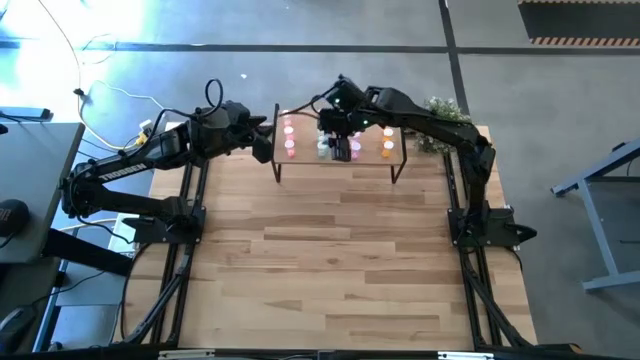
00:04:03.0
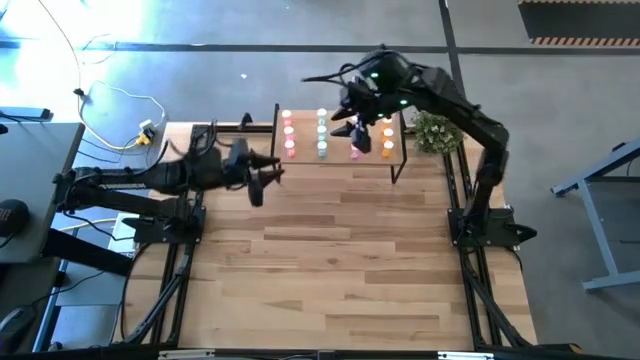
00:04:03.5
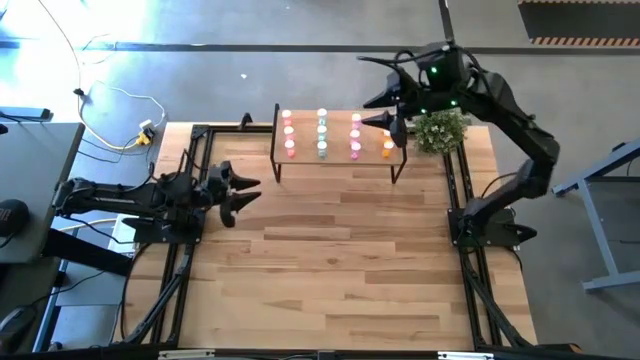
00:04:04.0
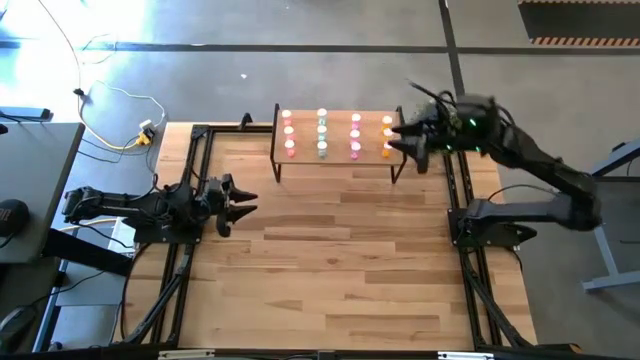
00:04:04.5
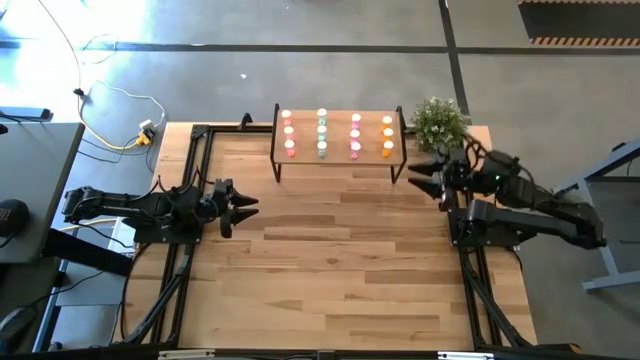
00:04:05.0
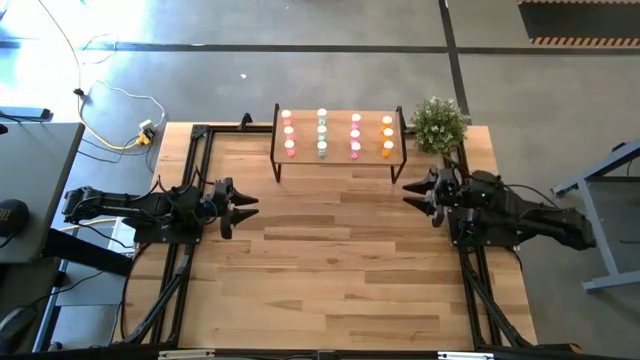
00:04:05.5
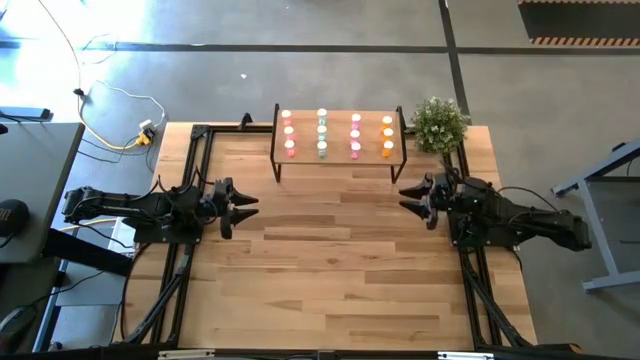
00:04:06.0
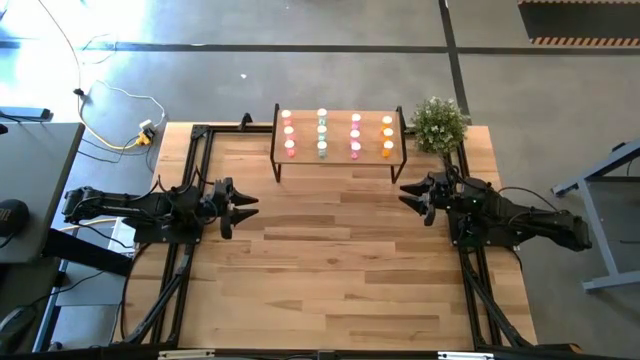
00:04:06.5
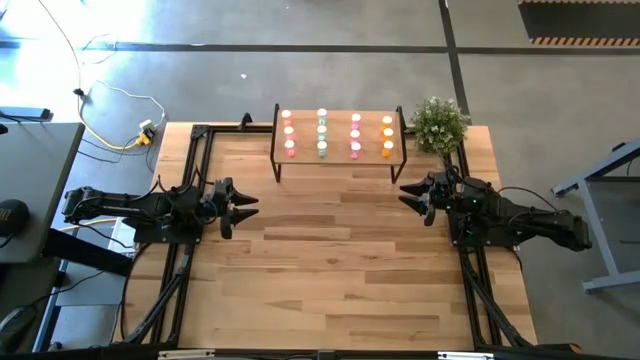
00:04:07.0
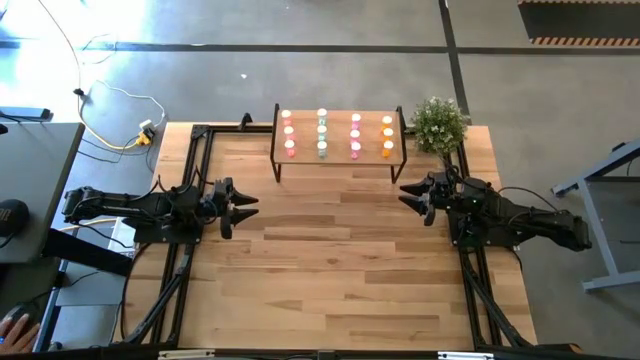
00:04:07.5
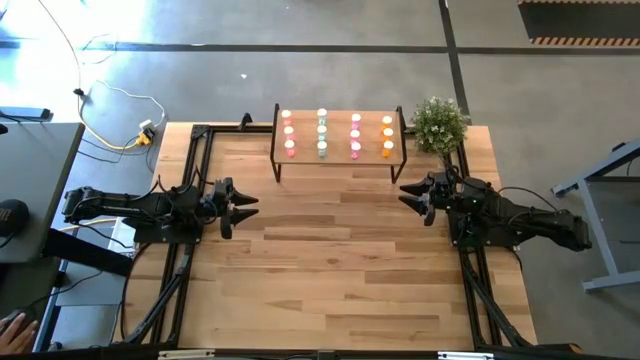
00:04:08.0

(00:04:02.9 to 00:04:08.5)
Task: Pick and place medicine bottles onto shelf by color
Return to Home Position

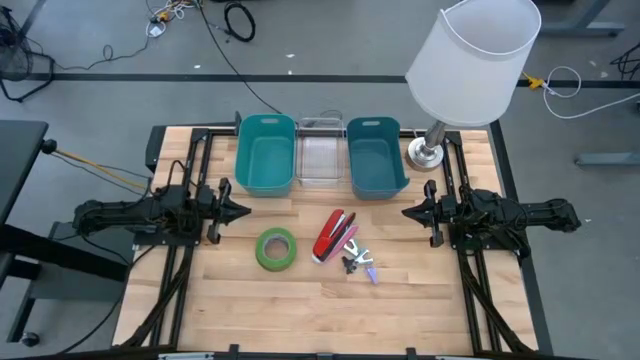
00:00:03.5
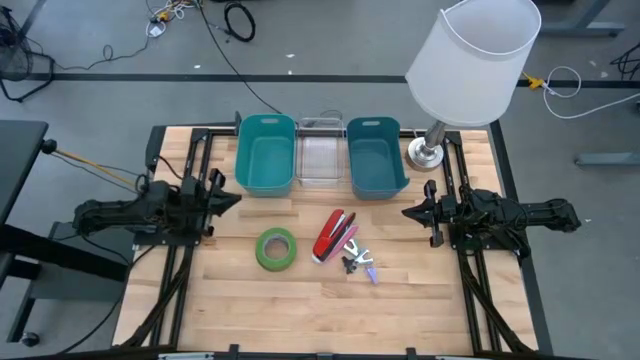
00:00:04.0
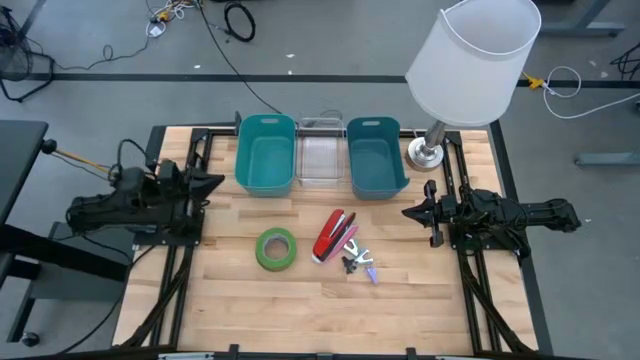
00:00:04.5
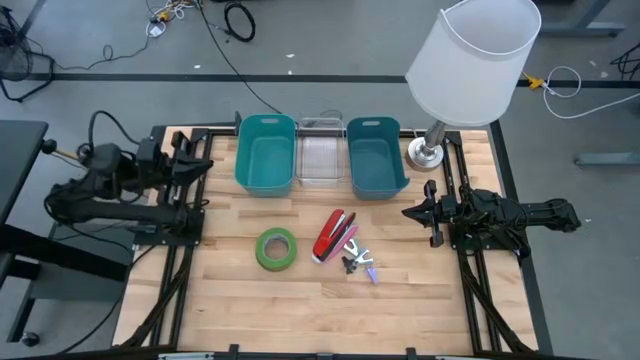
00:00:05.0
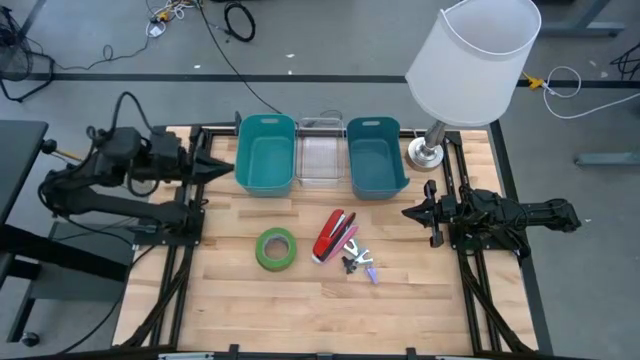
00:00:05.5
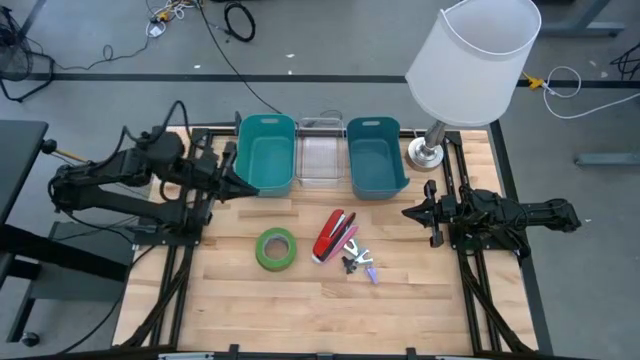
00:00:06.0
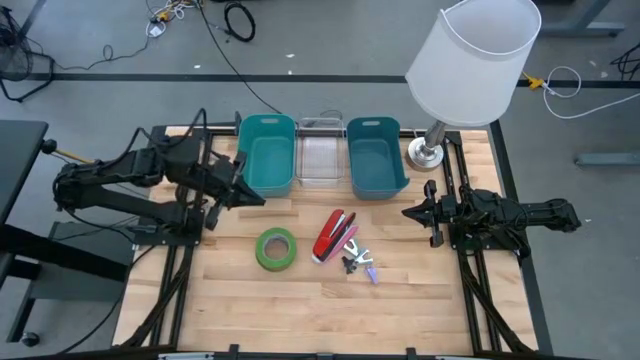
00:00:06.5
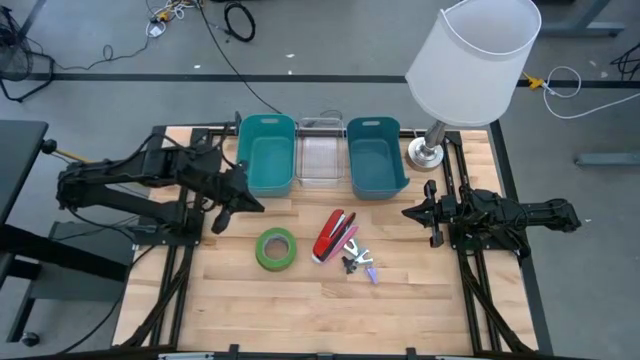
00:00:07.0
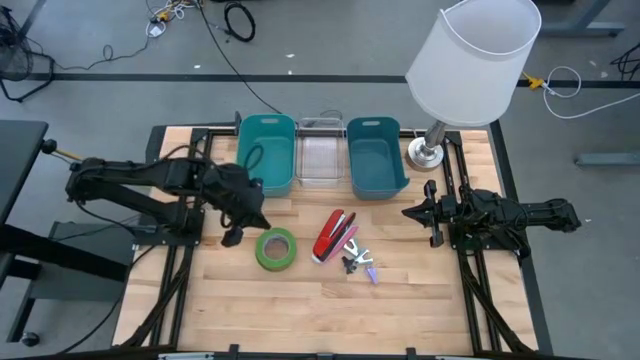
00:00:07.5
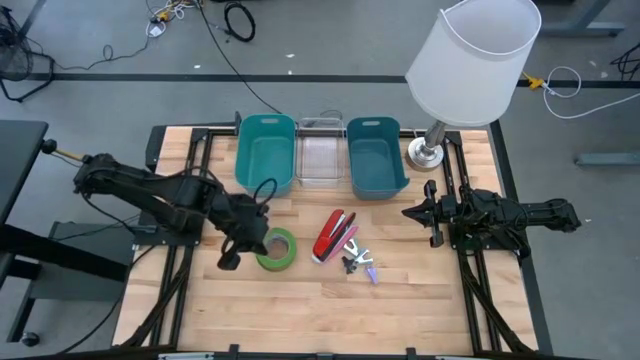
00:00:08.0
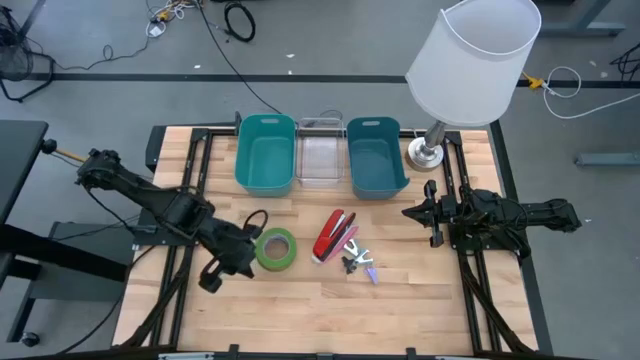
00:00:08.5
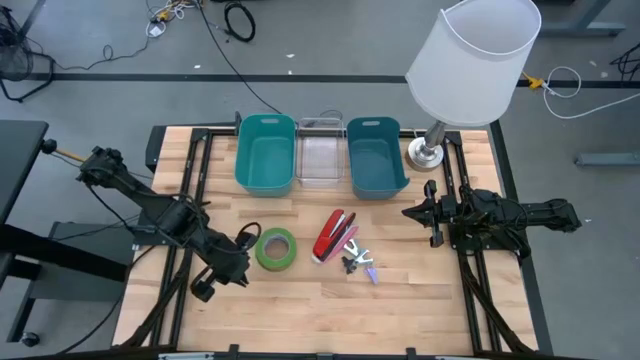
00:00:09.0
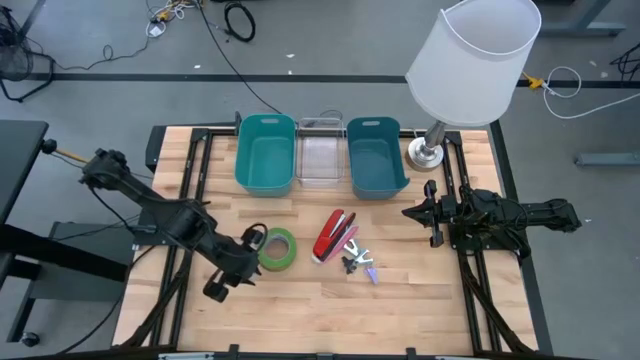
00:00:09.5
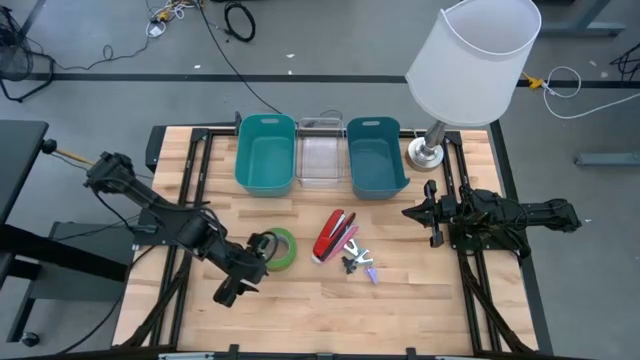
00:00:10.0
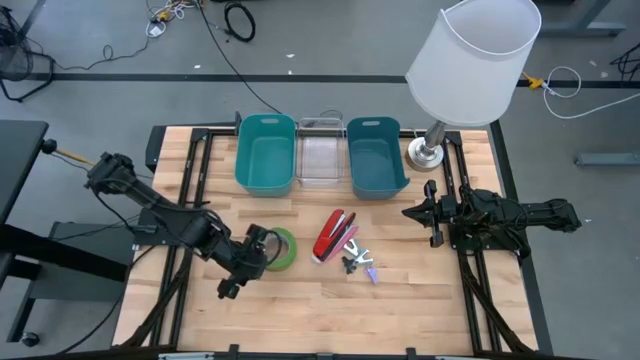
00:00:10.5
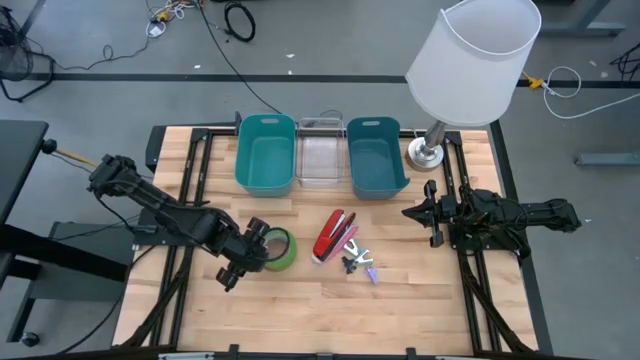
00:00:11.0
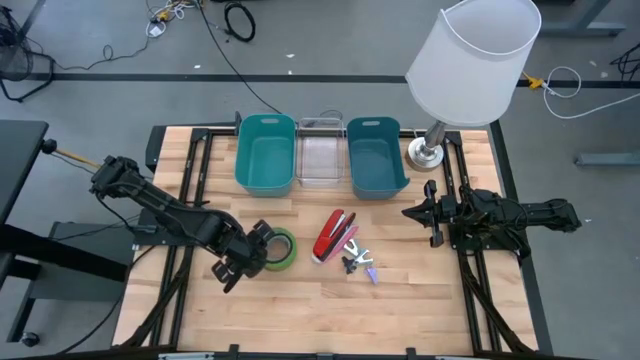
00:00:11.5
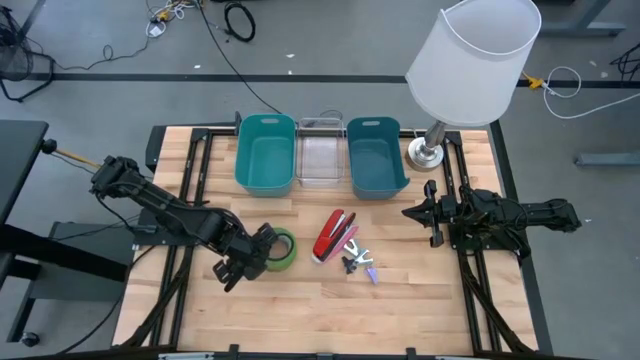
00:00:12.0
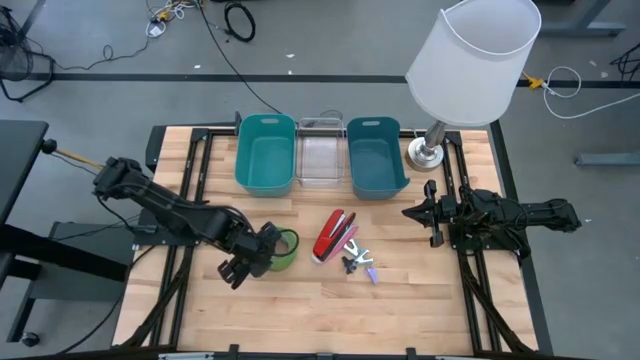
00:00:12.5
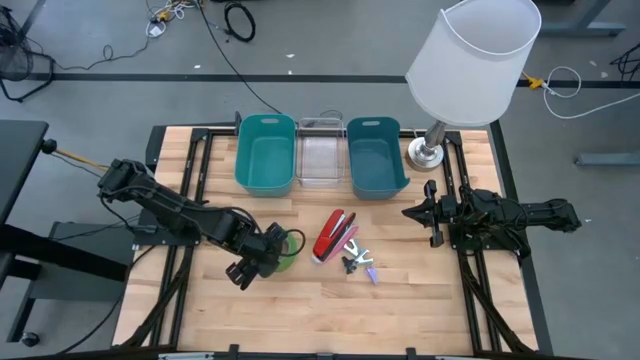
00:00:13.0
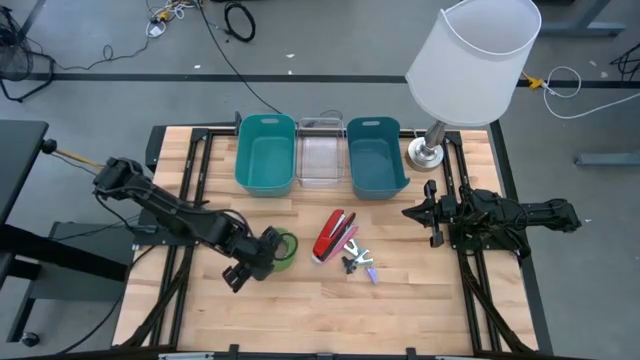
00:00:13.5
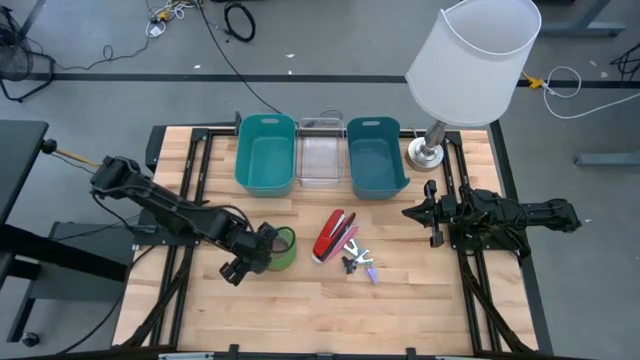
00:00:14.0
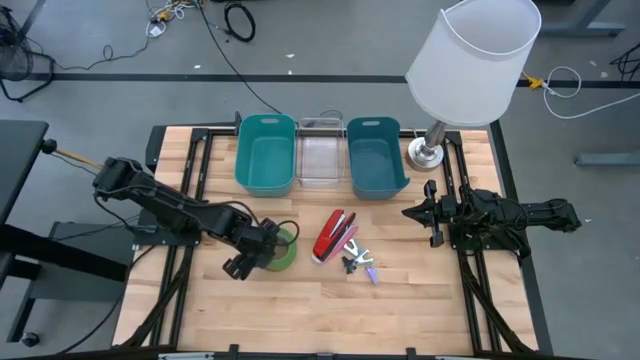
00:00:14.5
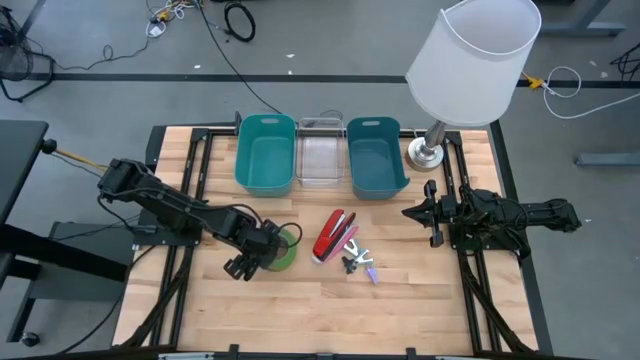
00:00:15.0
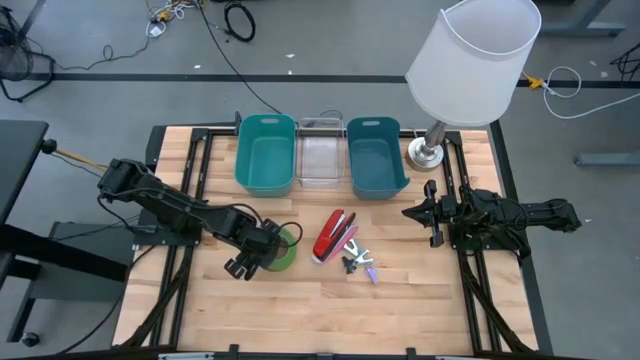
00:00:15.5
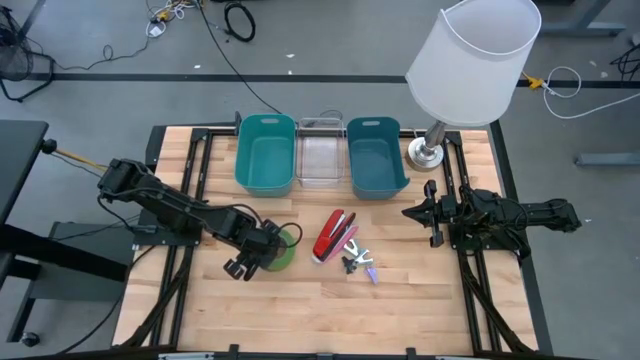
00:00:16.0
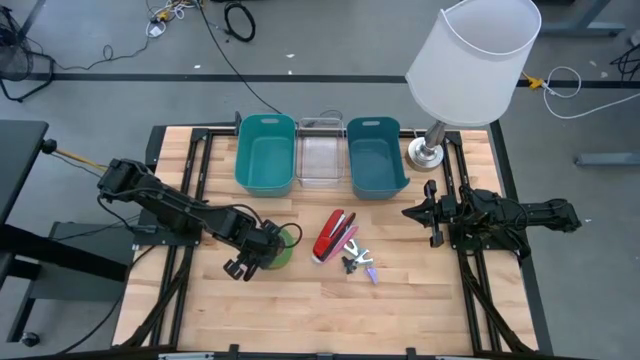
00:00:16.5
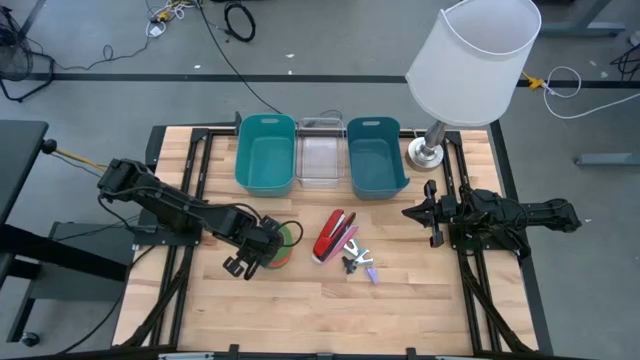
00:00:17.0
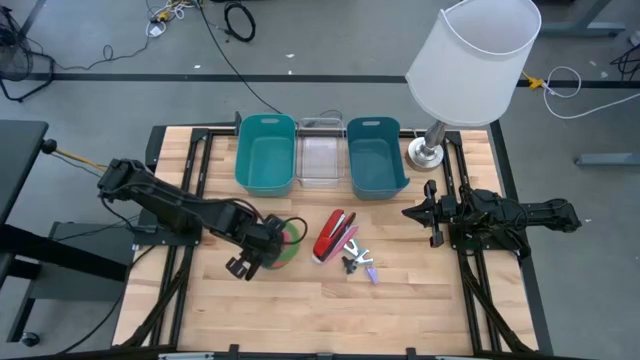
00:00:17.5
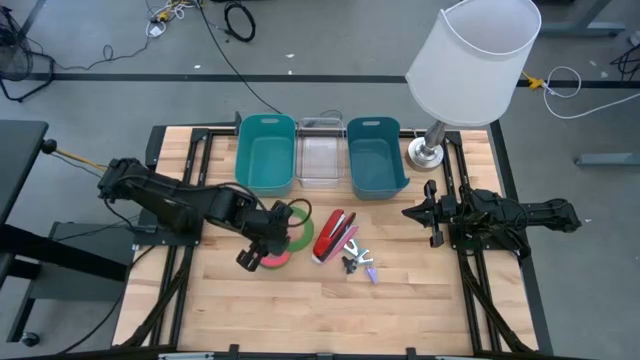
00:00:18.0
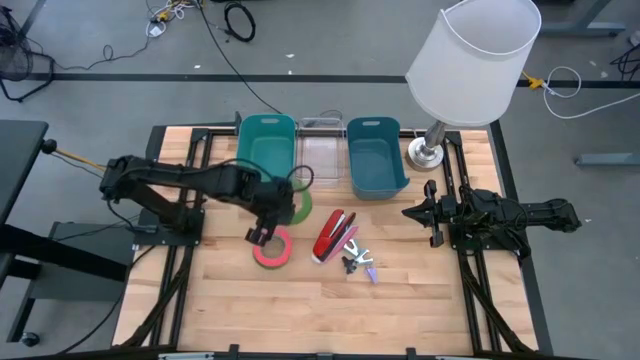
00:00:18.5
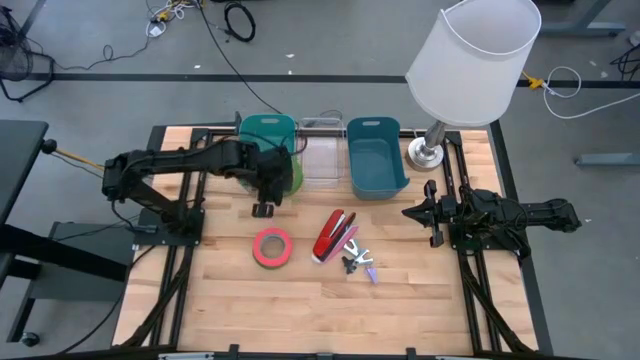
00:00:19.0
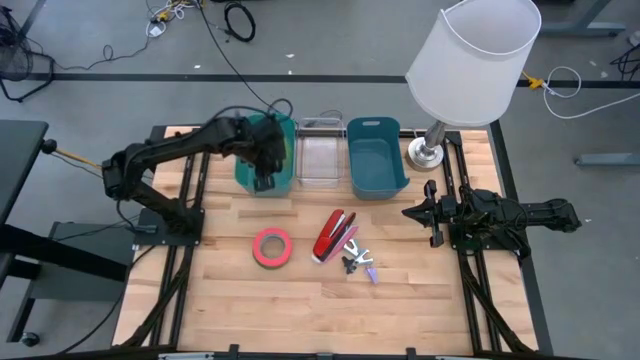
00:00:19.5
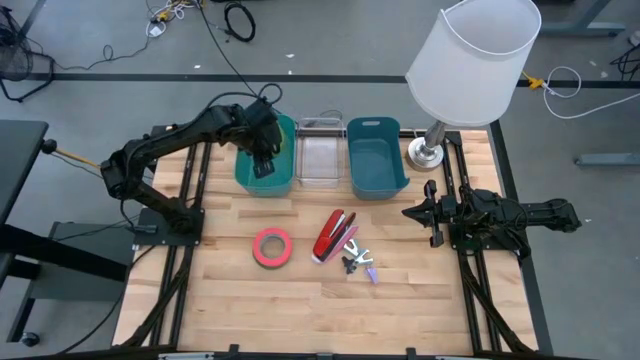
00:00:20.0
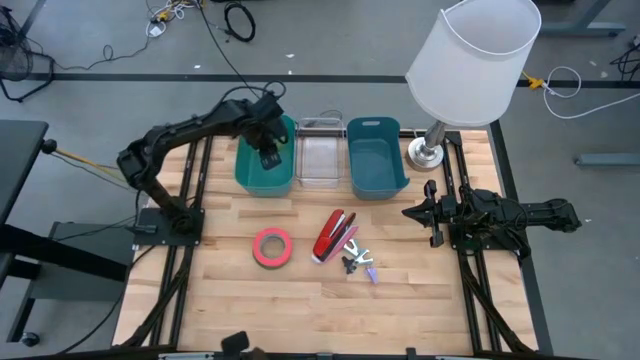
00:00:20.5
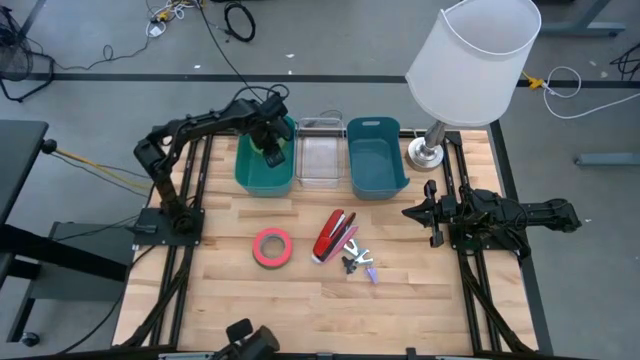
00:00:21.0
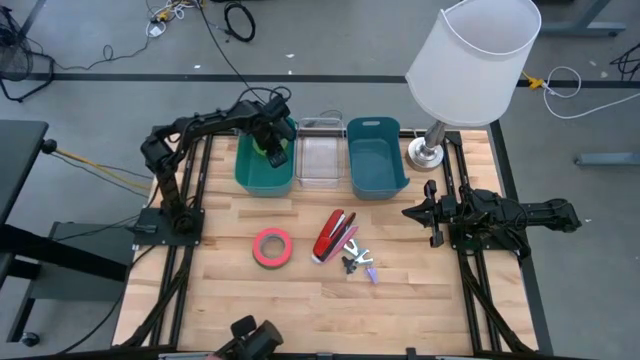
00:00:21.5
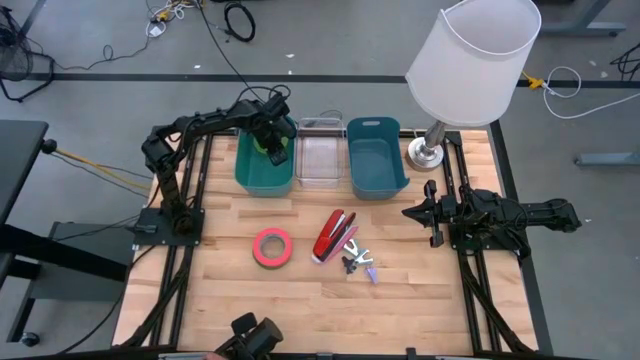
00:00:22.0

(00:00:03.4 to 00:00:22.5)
Task: Pick and place Stapler, Stapler remover, tape
Put the green tape into the green bin
